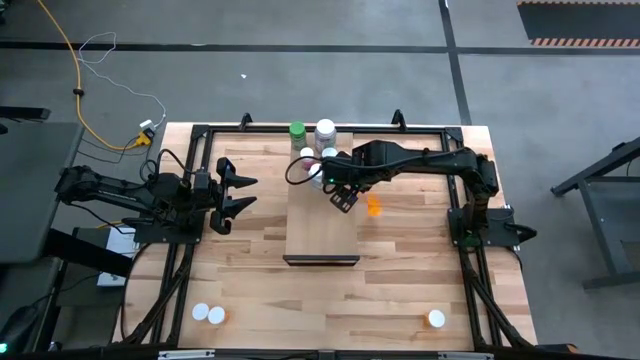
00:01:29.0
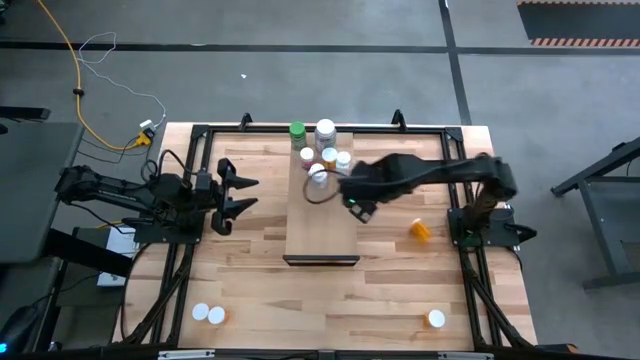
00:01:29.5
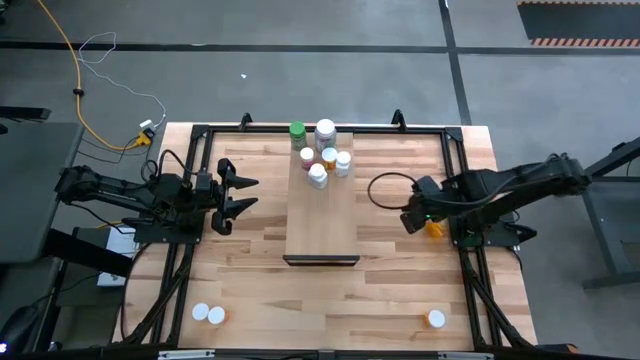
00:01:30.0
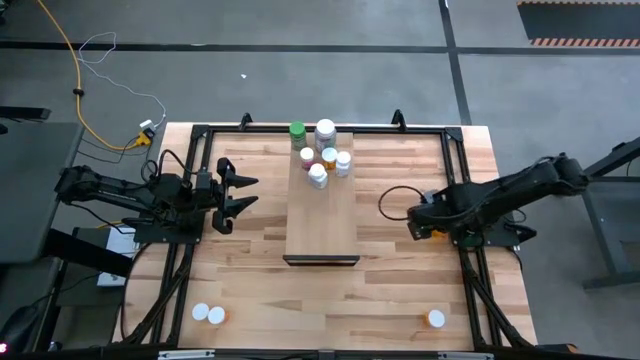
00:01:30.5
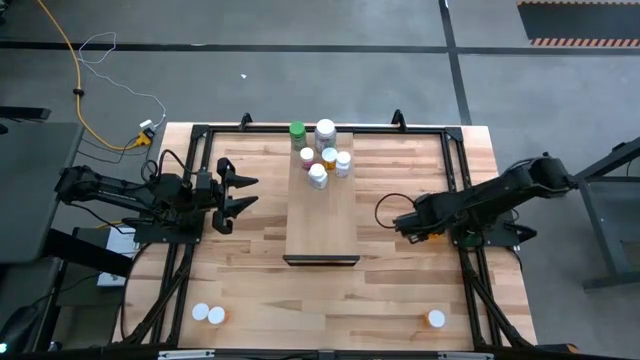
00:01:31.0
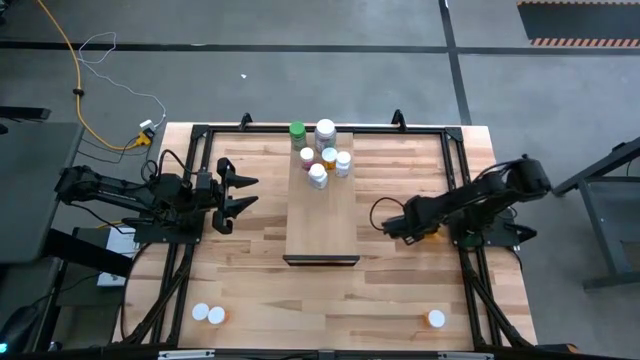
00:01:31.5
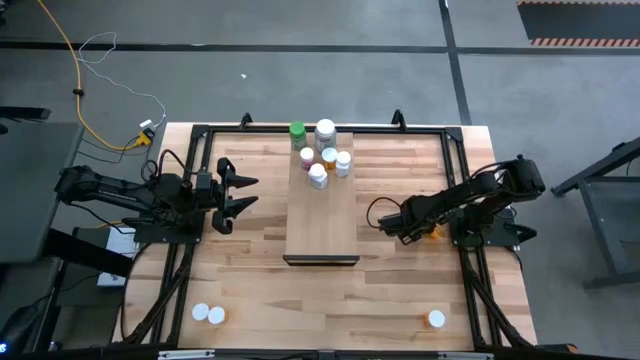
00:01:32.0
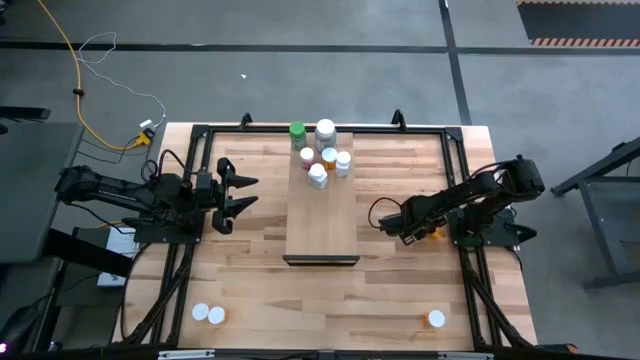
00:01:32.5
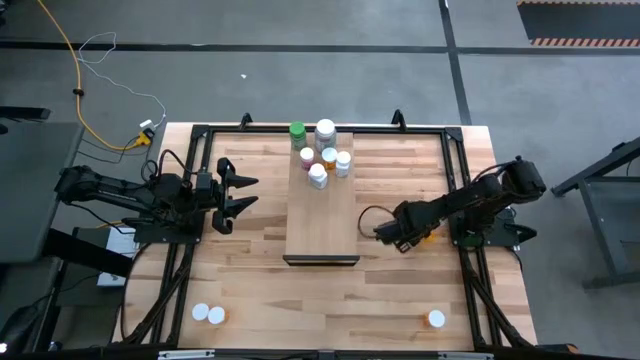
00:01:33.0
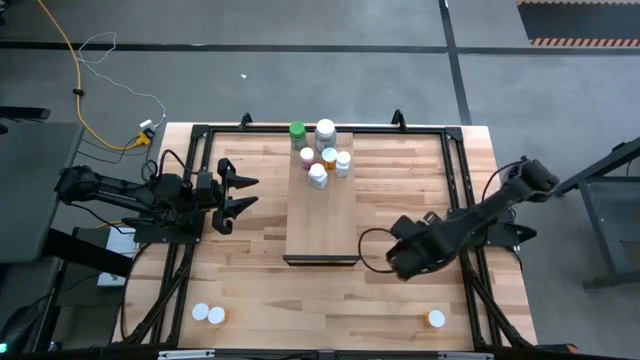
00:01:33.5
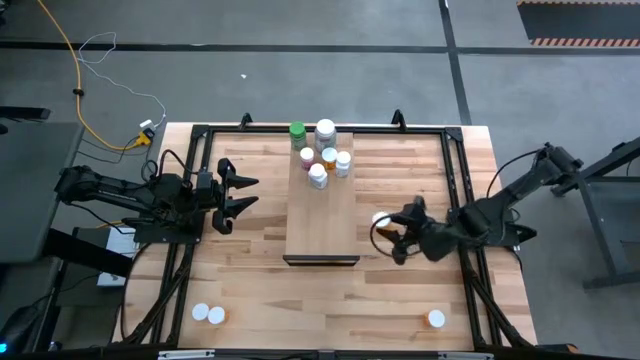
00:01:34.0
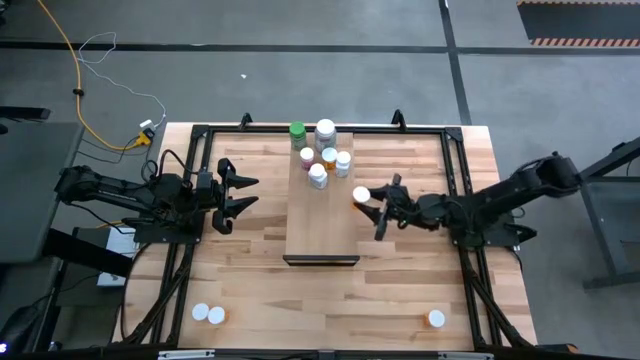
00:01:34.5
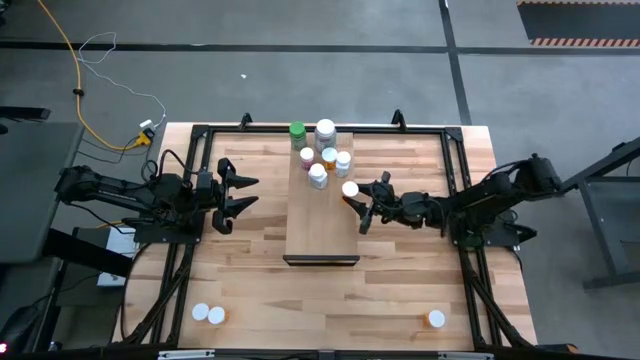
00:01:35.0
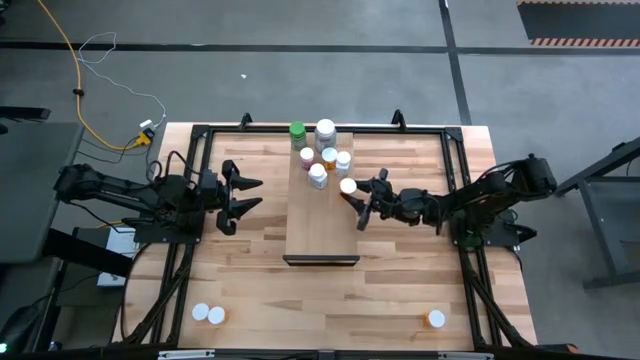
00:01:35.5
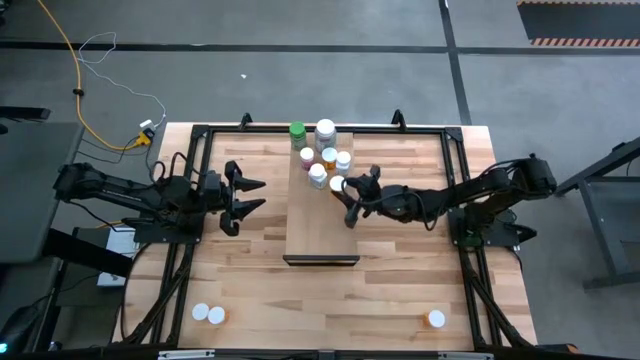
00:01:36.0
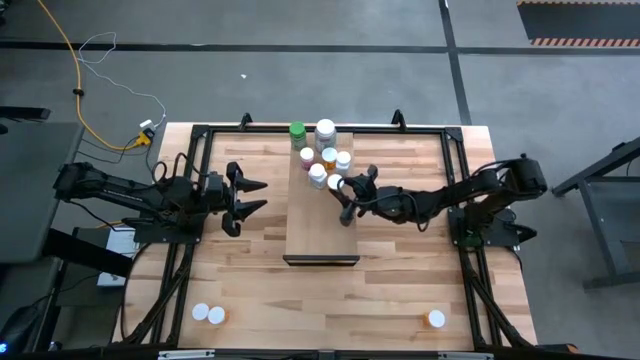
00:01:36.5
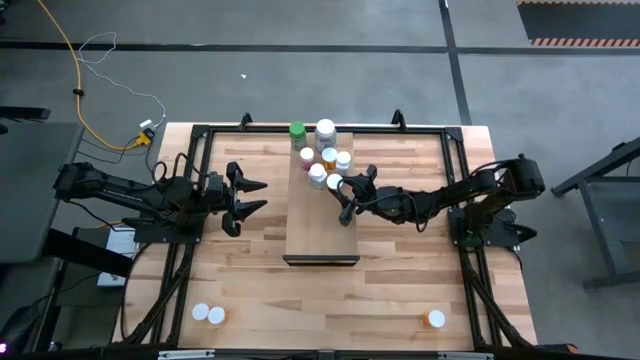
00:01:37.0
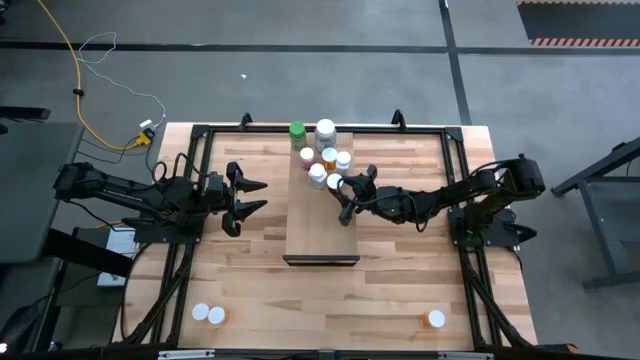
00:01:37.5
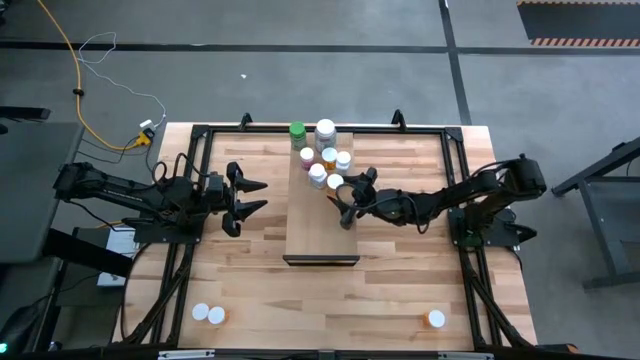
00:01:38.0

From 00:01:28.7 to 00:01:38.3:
Task: Pick and place medicine bottles onto shelf by color
Put the orange pill bottle on the shelf

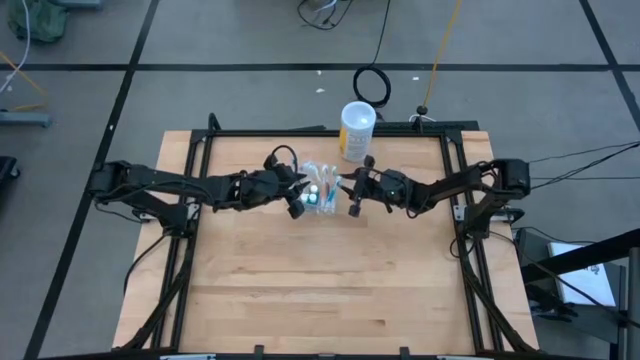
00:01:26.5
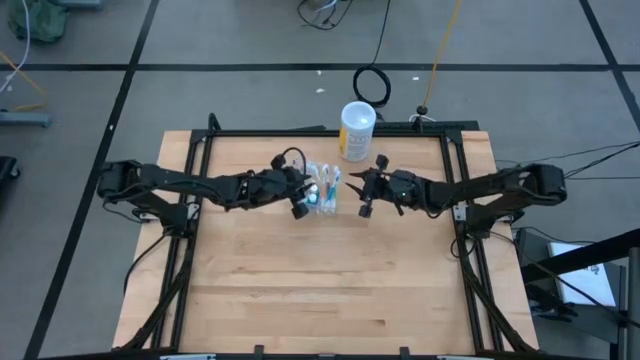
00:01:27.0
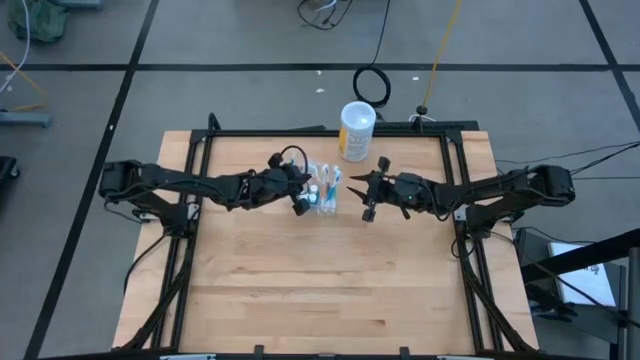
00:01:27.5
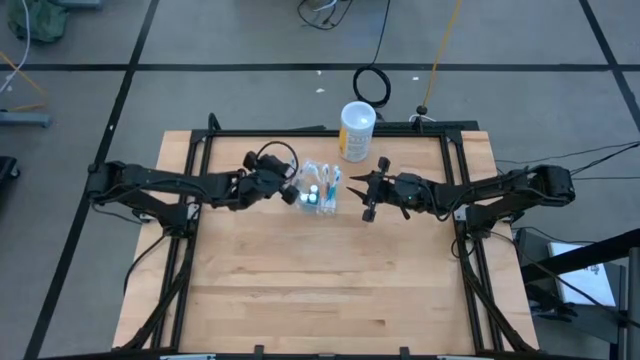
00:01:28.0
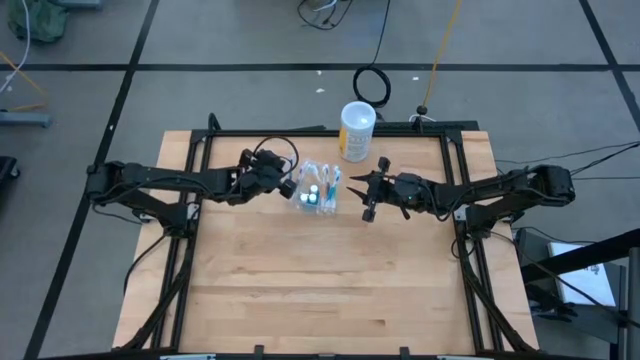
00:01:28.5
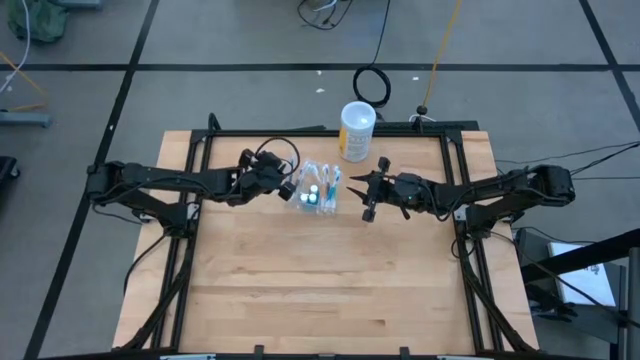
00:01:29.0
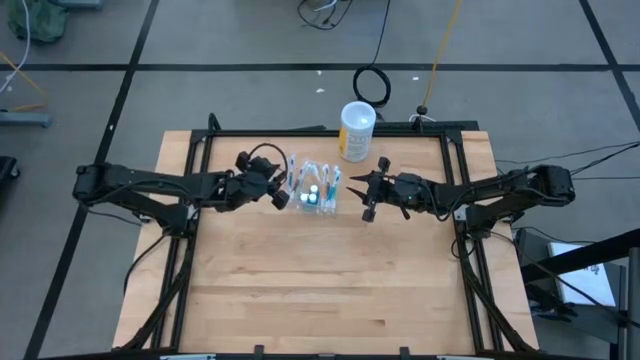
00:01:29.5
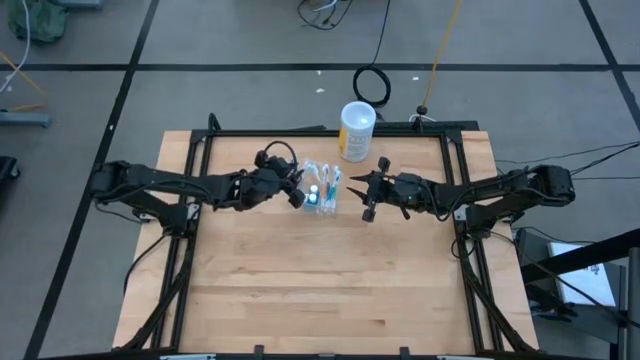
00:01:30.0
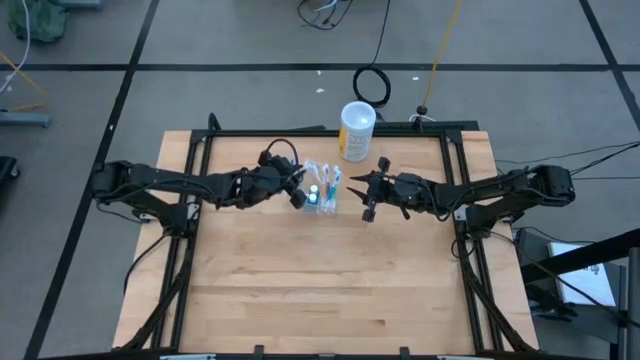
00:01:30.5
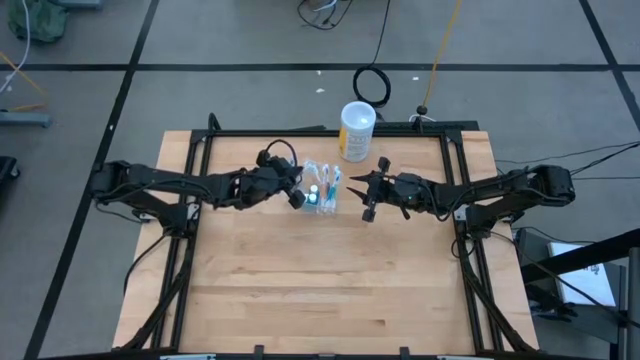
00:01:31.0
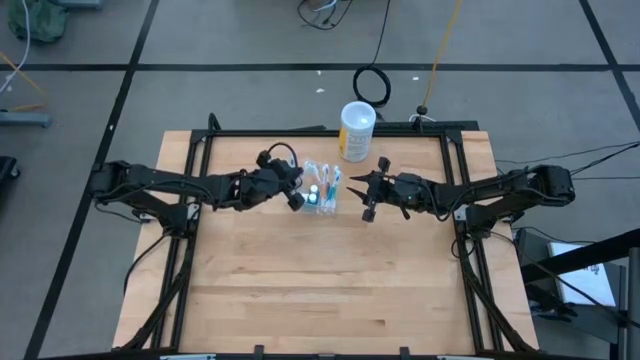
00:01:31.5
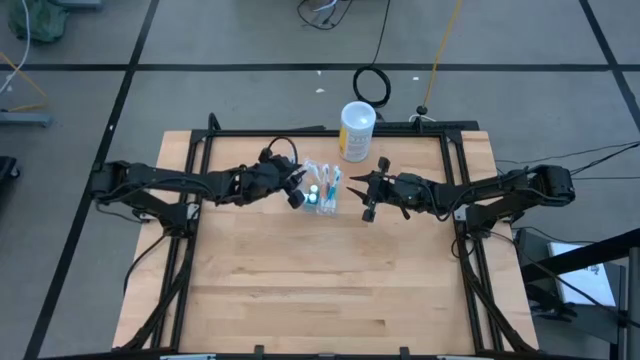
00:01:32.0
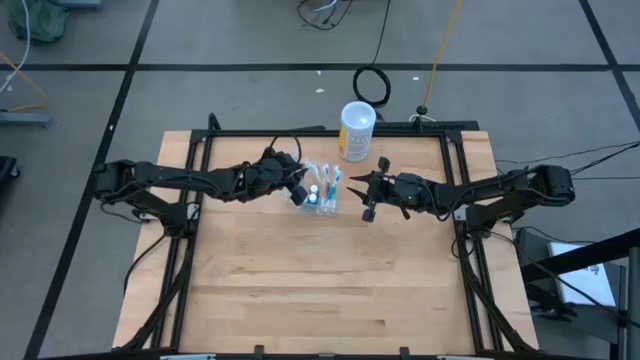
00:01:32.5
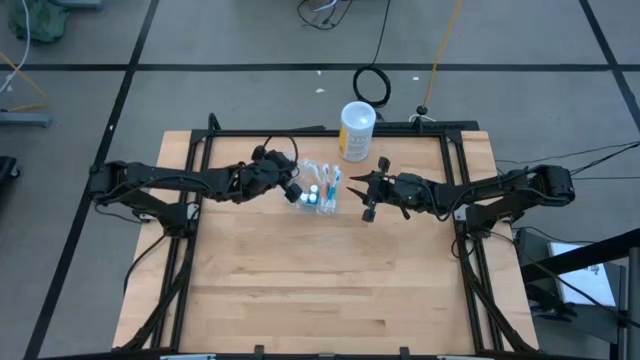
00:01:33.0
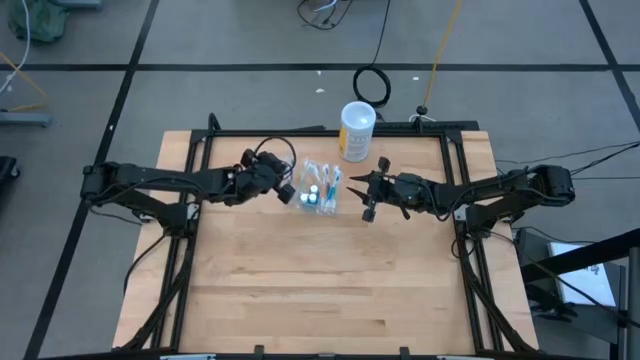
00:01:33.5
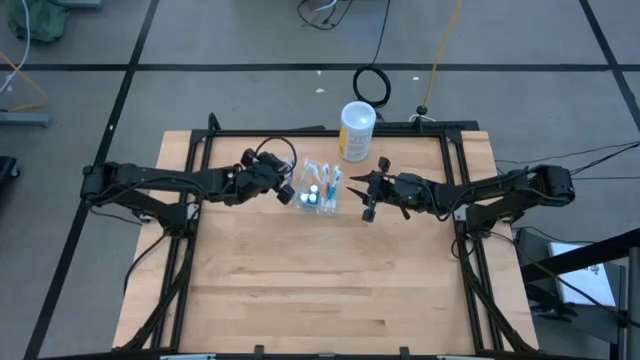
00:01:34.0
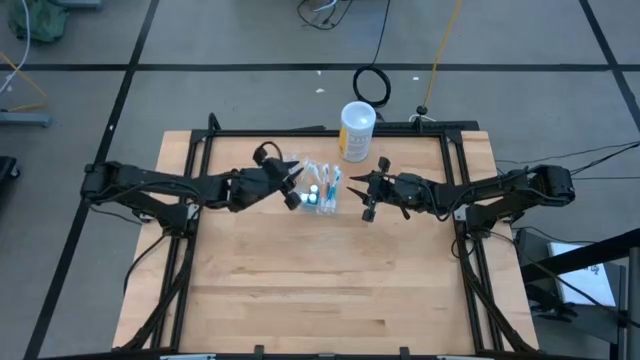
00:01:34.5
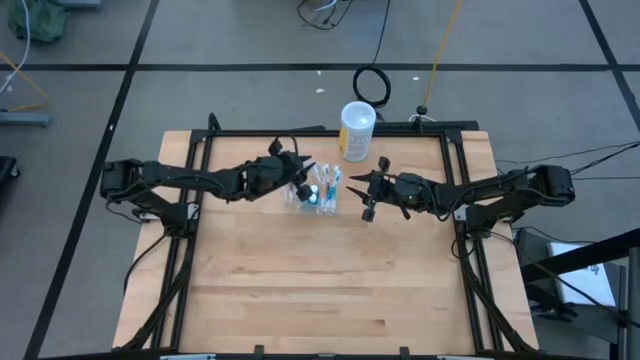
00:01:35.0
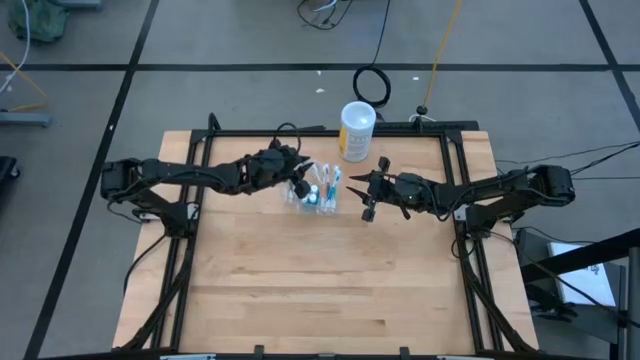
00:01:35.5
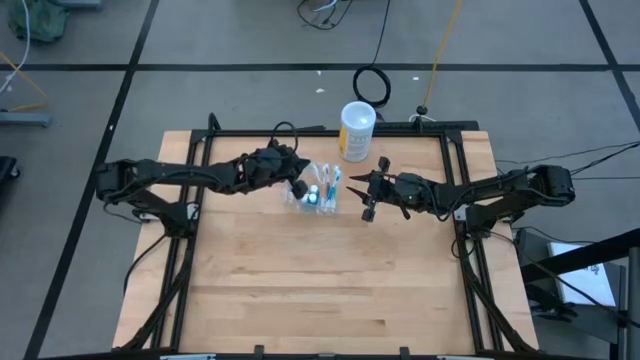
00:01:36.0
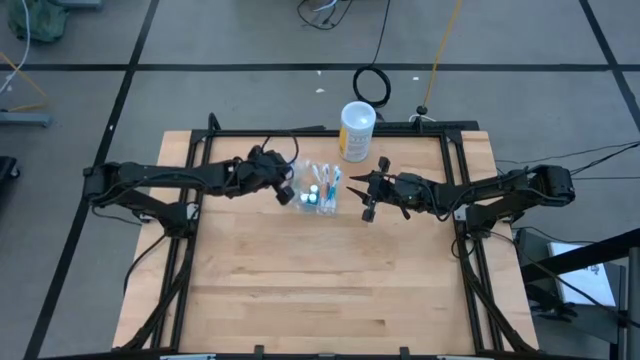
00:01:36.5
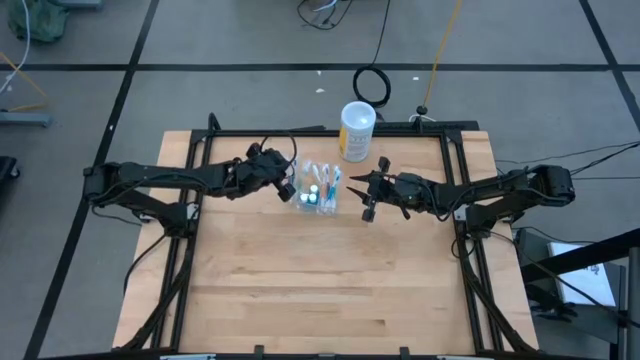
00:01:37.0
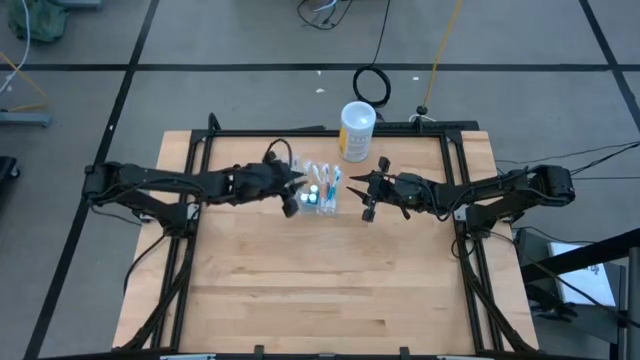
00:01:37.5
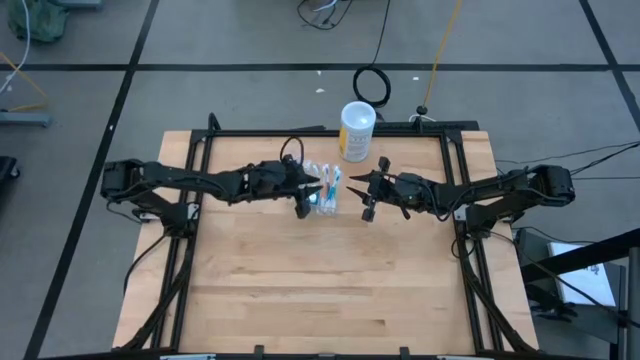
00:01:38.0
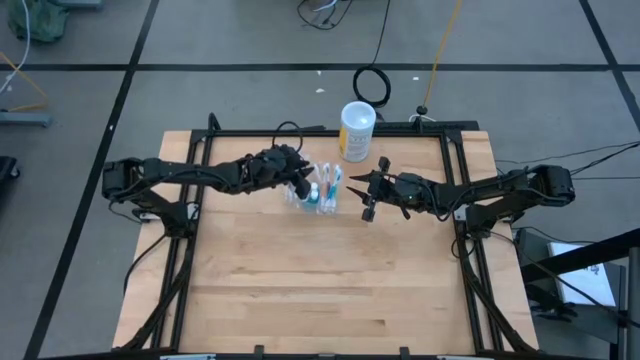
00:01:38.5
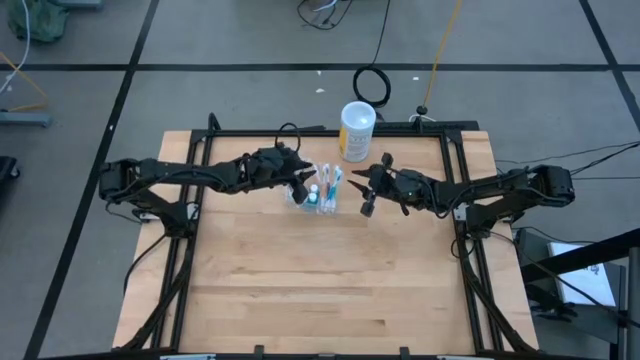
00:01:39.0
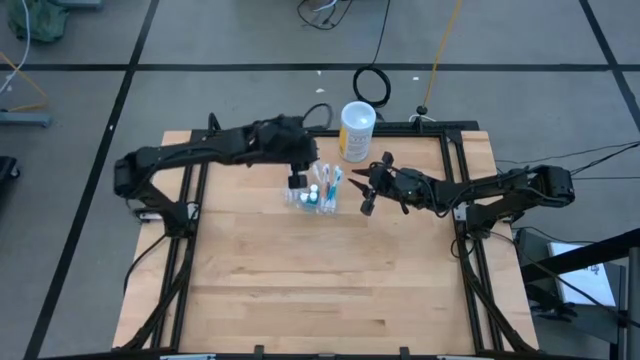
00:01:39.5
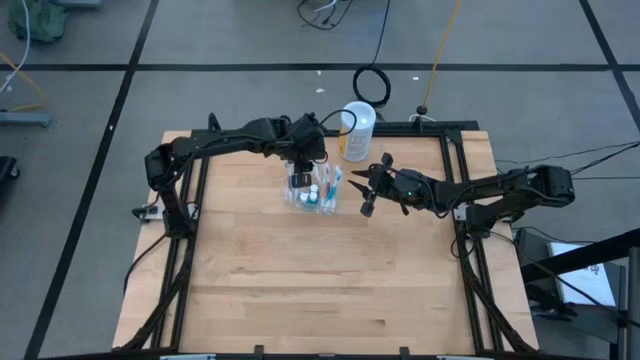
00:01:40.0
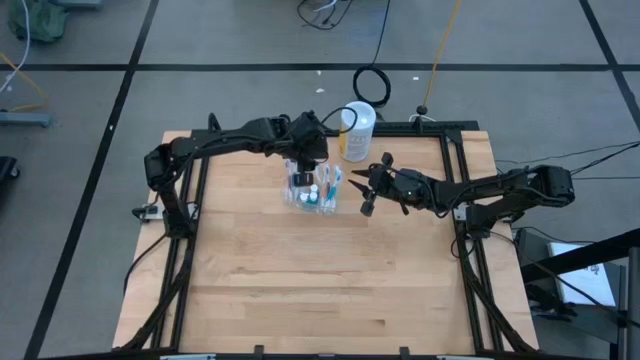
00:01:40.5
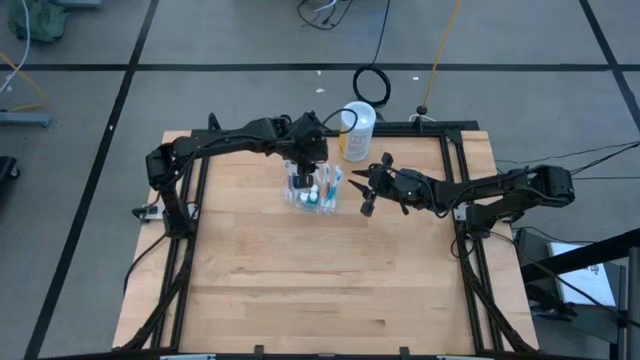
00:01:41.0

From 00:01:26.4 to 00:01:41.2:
Task: Pick & Place toothbrushing station
Adjust the toothbrushes into the transparent organizer
